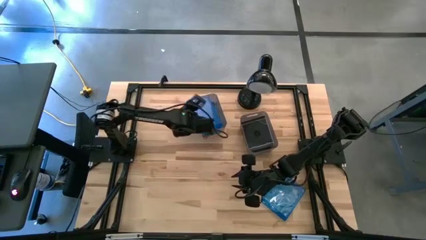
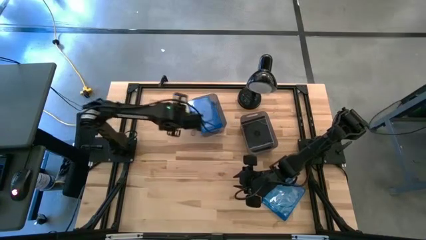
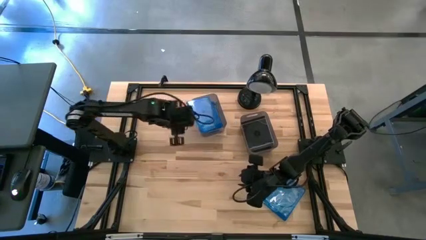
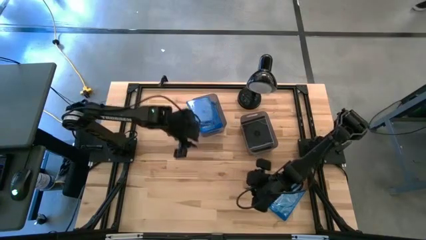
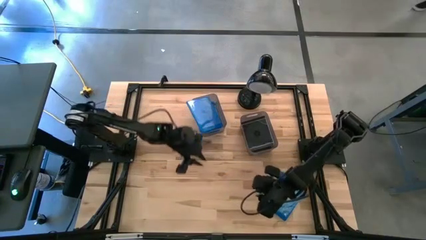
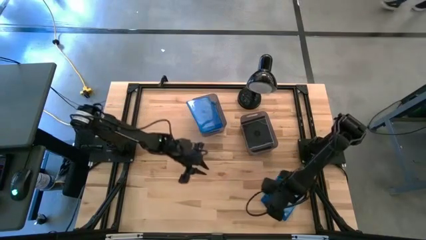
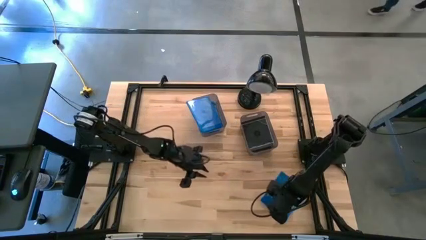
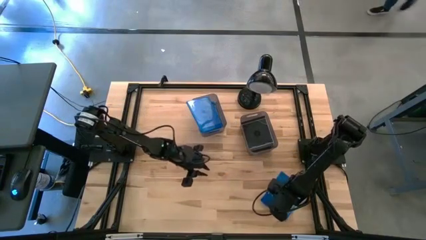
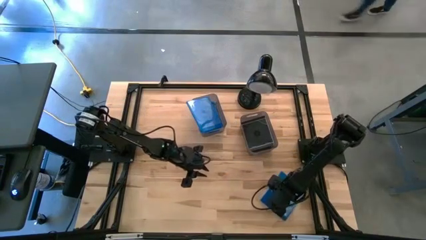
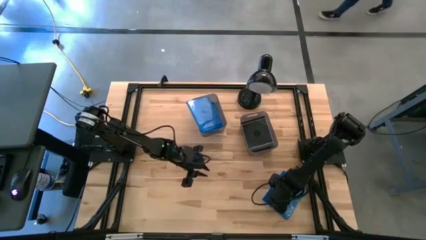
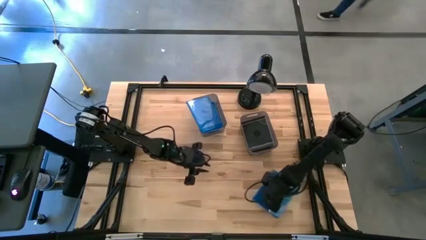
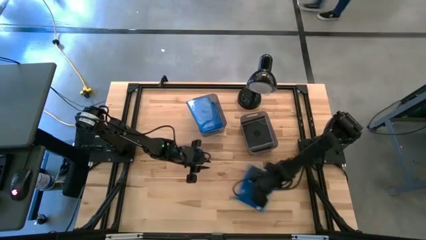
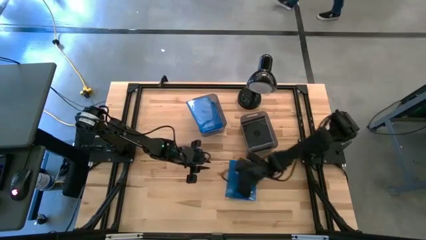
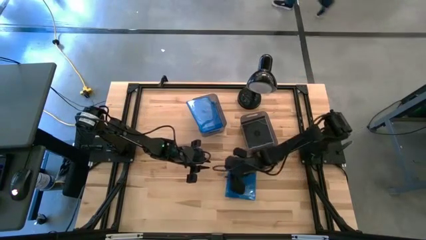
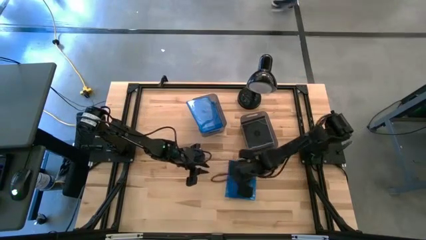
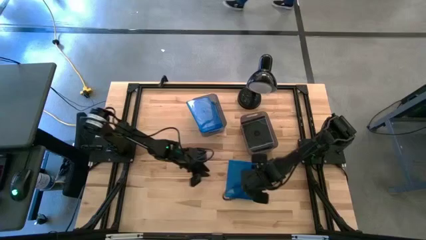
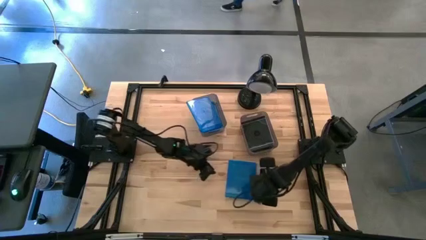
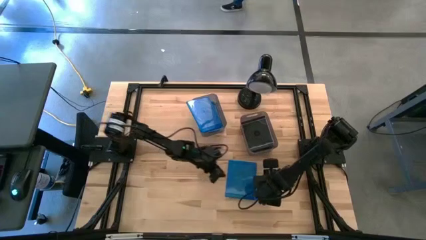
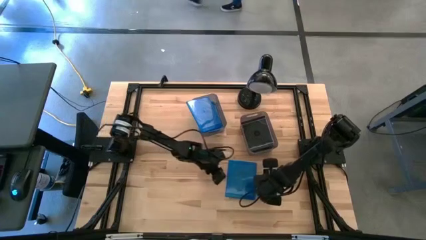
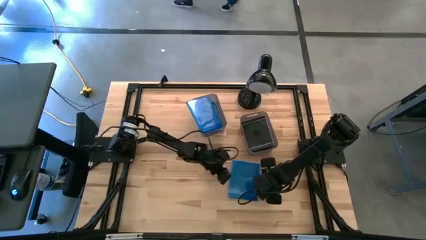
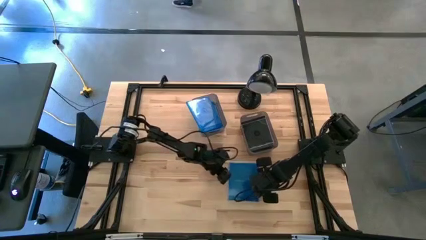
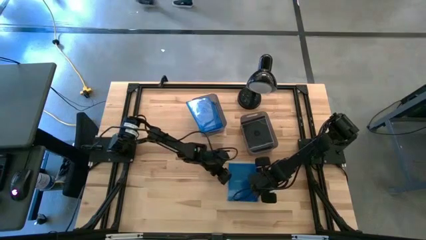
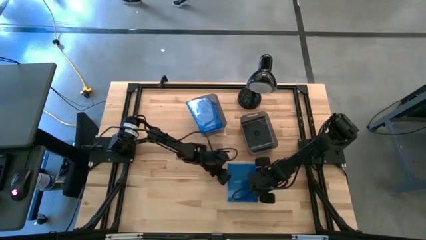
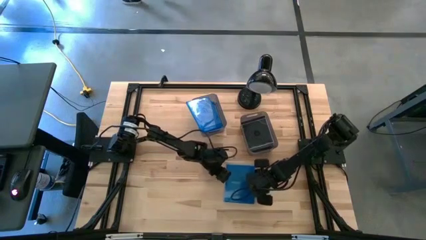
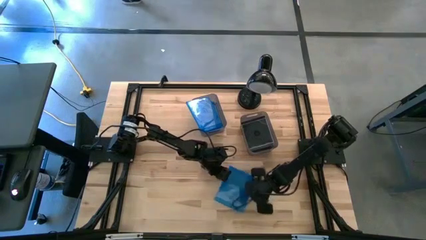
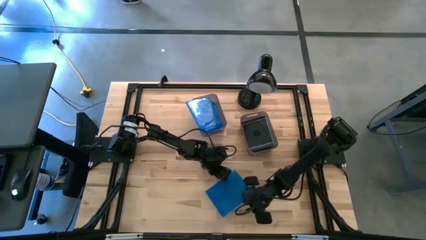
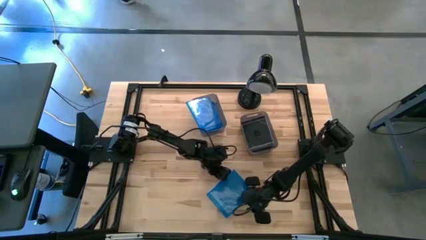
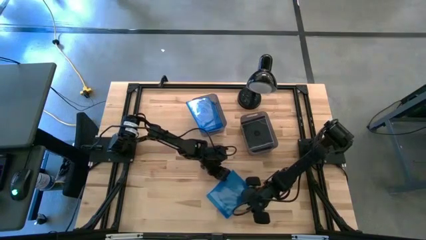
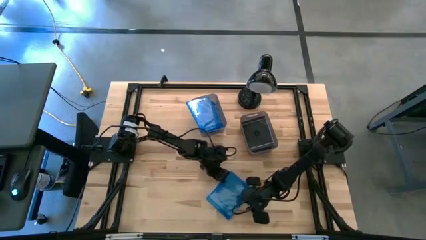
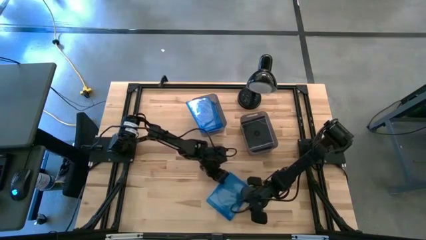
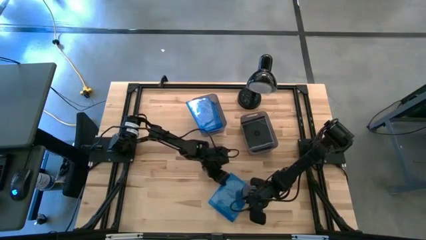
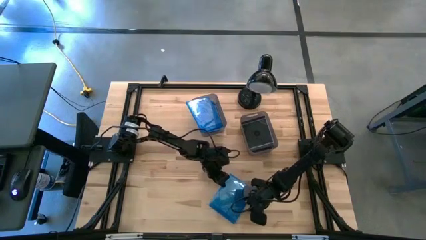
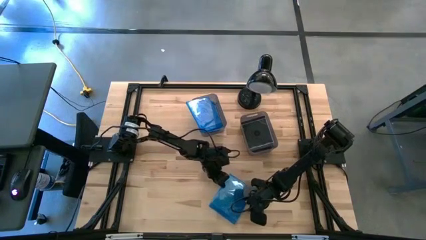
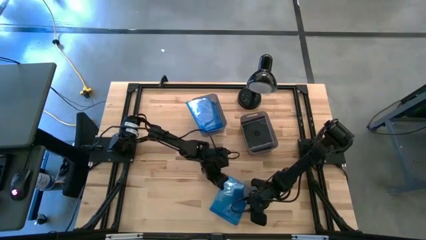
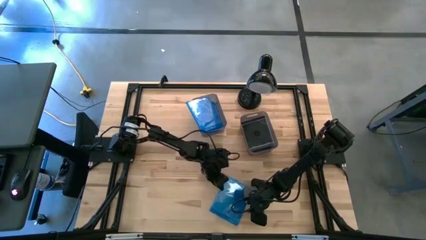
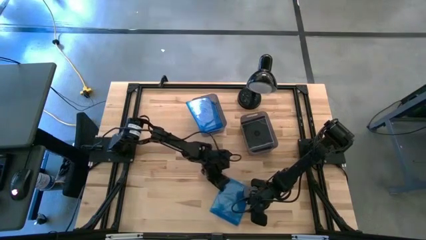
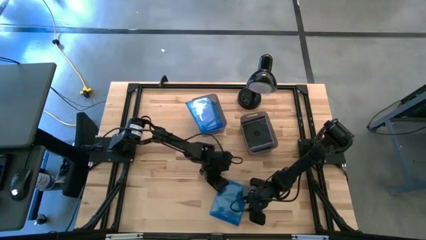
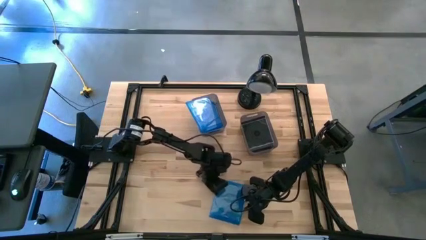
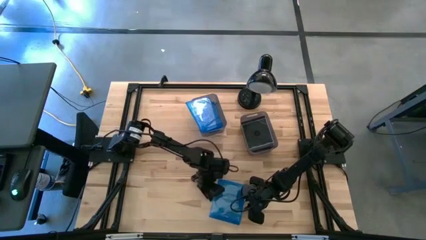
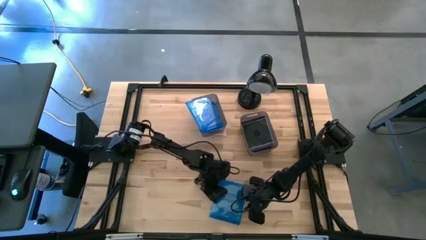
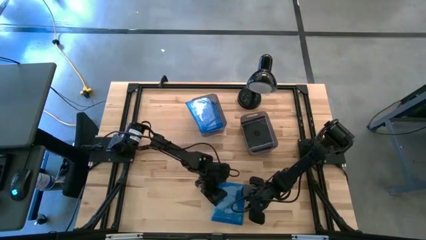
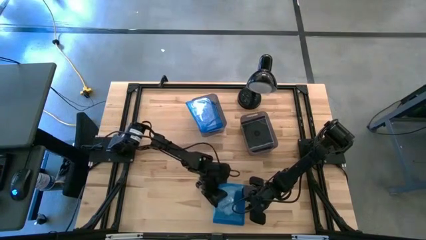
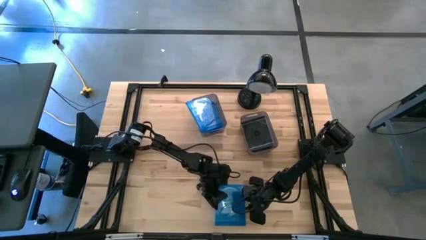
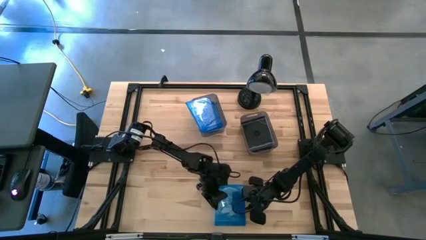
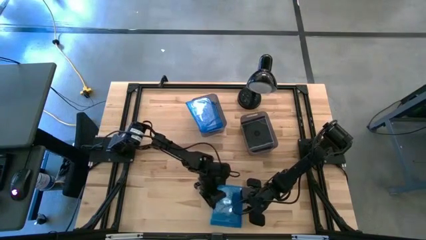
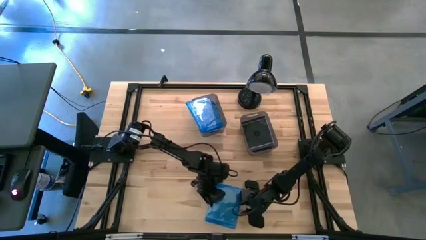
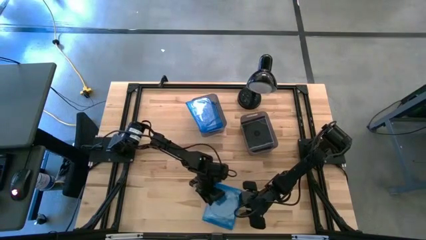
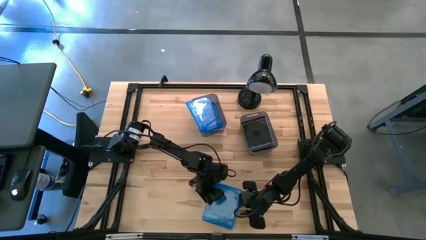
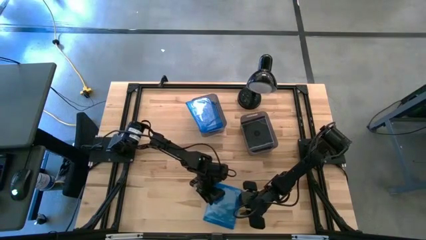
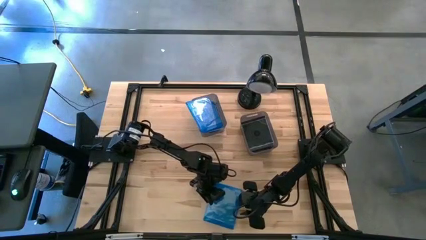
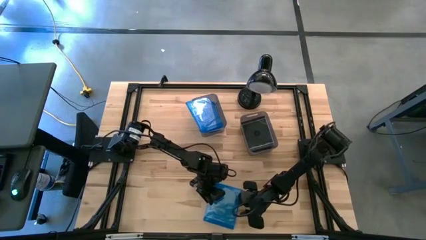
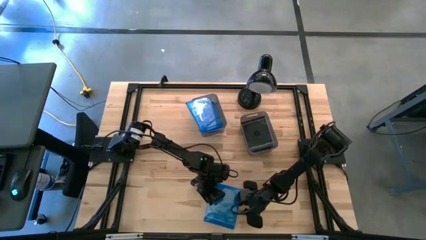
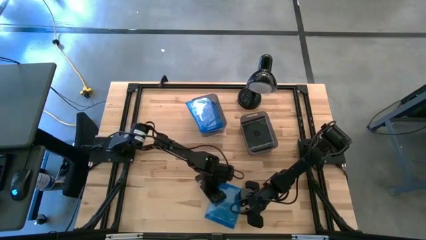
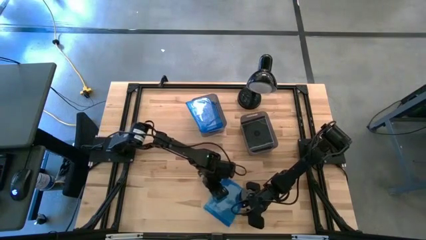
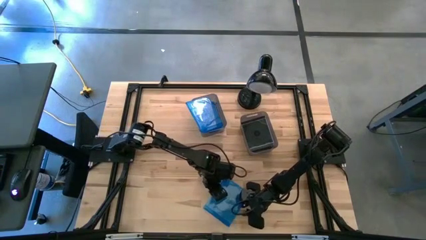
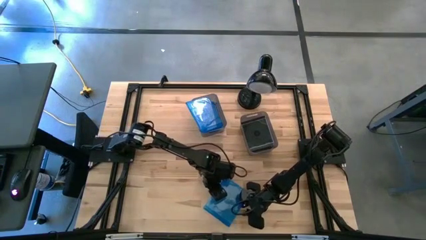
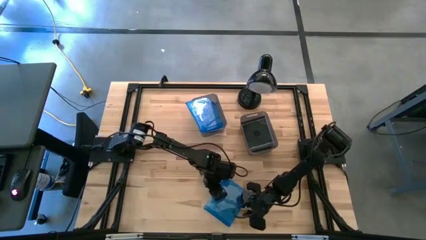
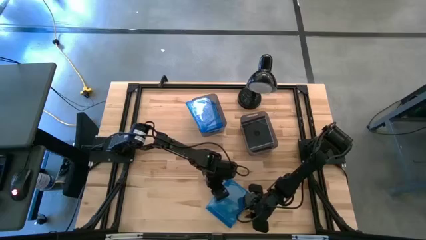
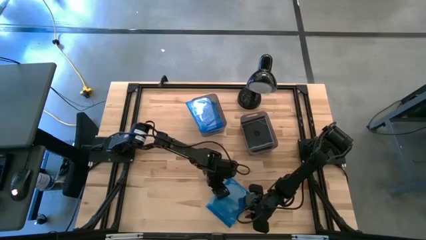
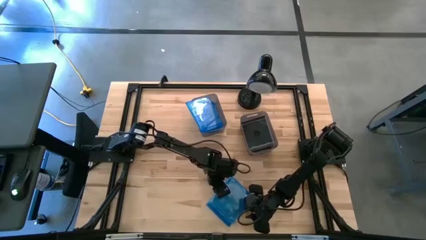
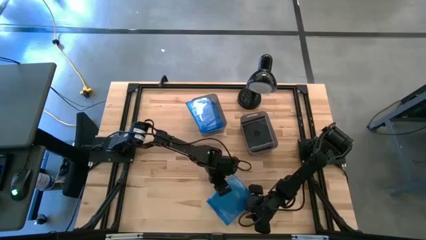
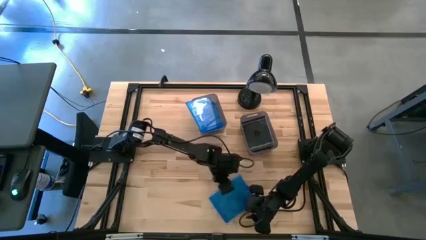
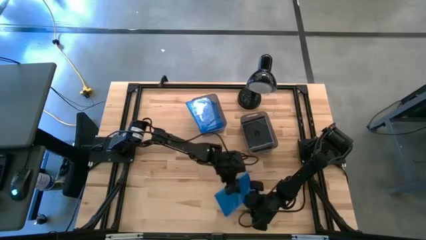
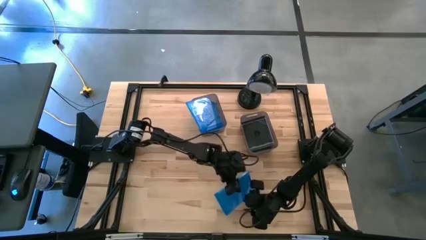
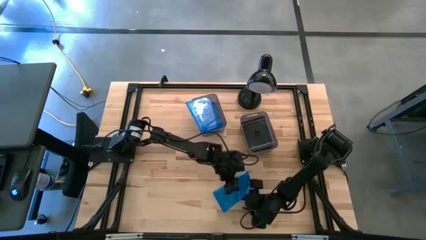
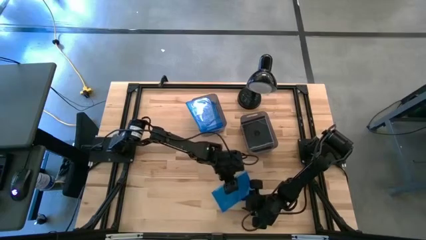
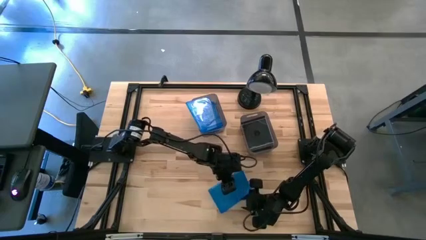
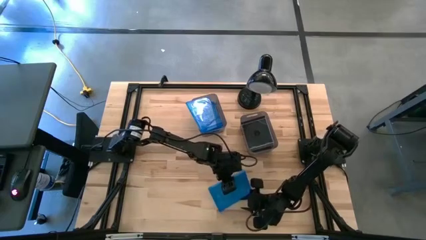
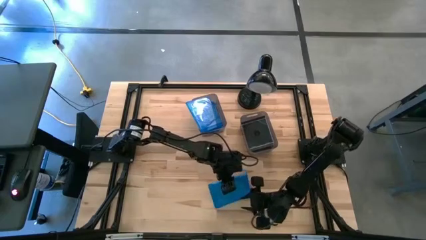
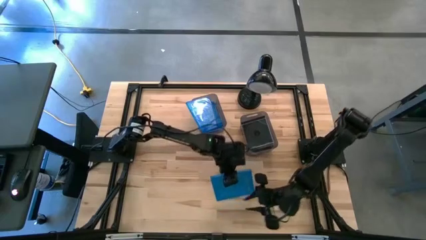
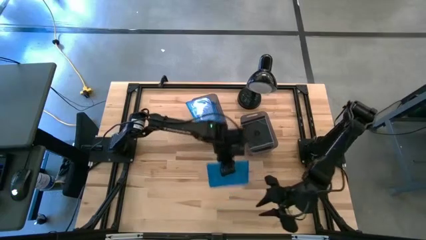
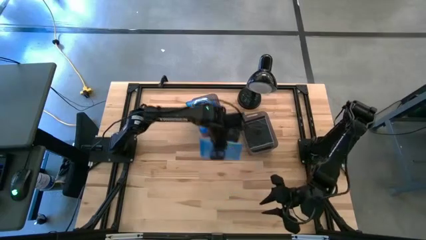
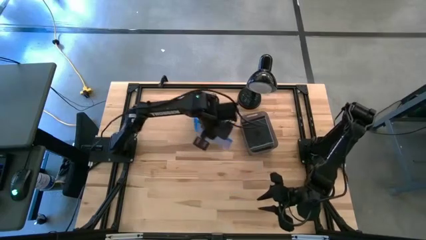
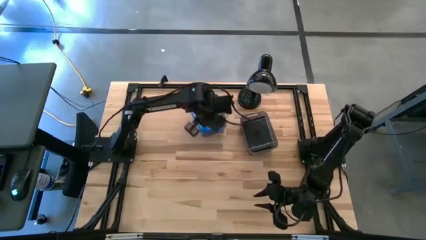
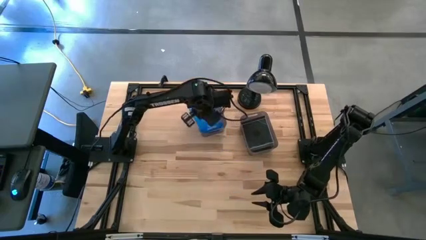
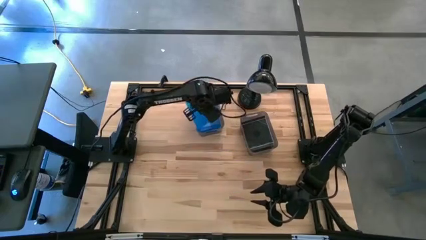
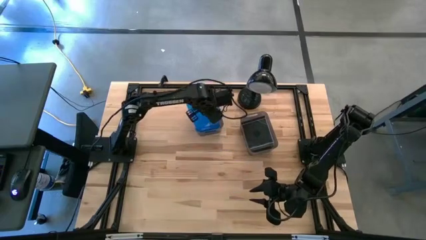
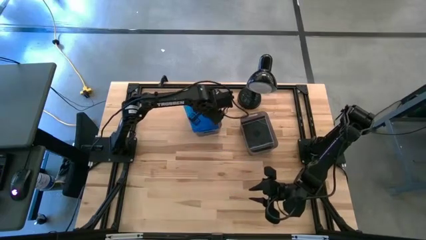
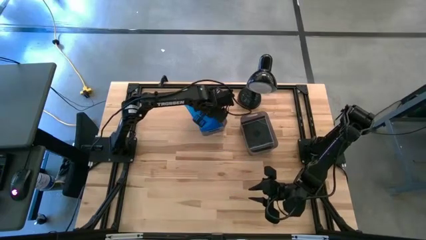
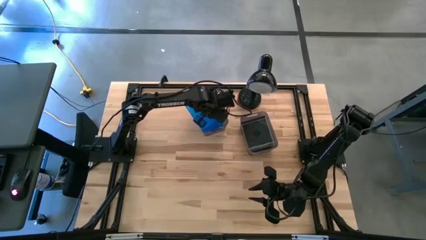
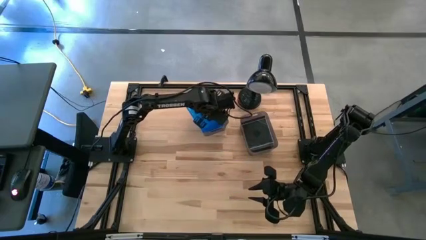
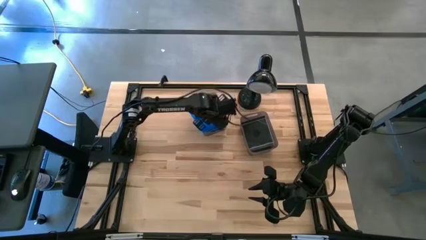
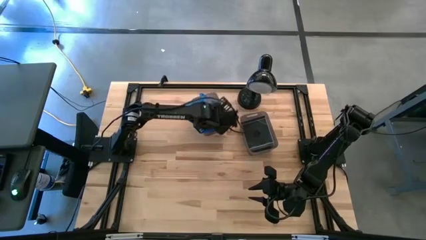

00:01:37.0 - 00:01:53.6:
Task: Pick & place jewel cases by type
Put the blue CD case into the left black bin
